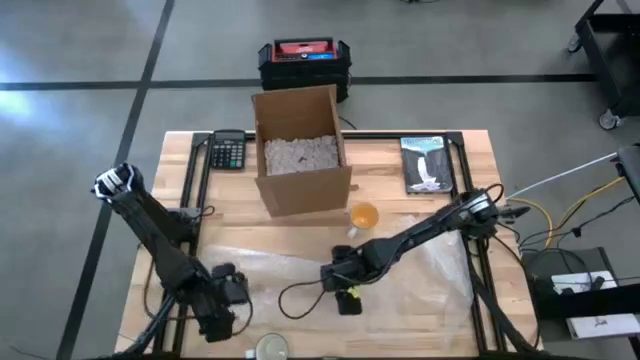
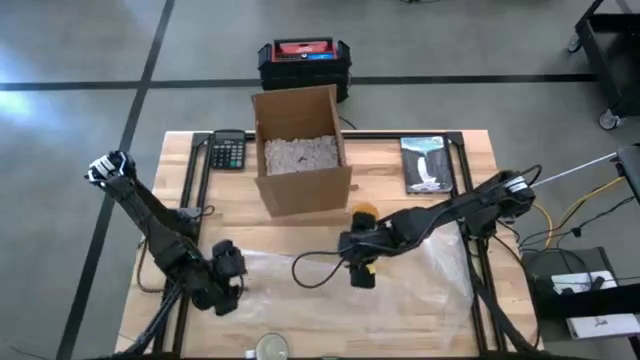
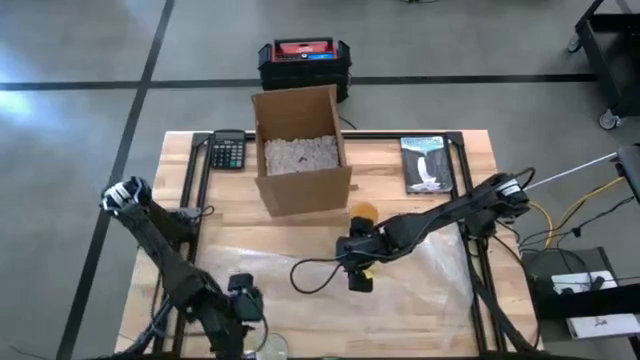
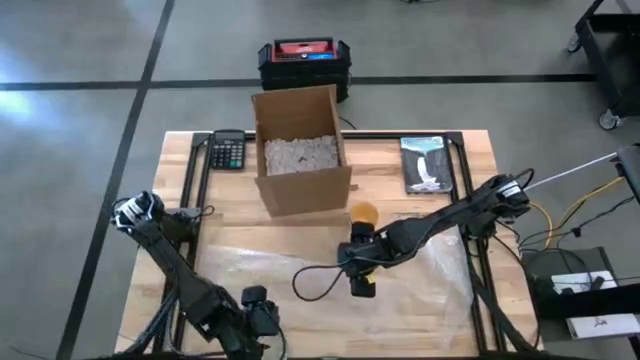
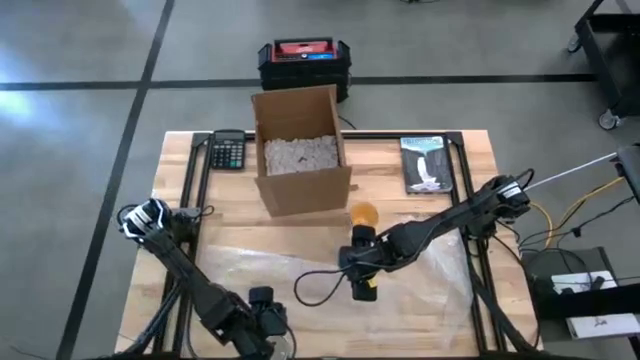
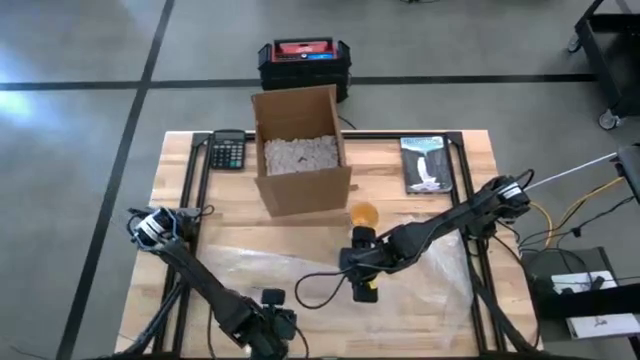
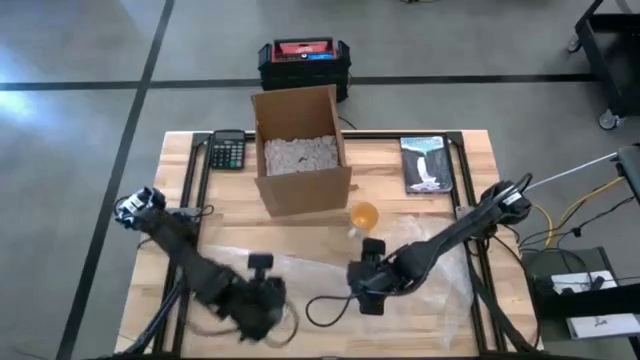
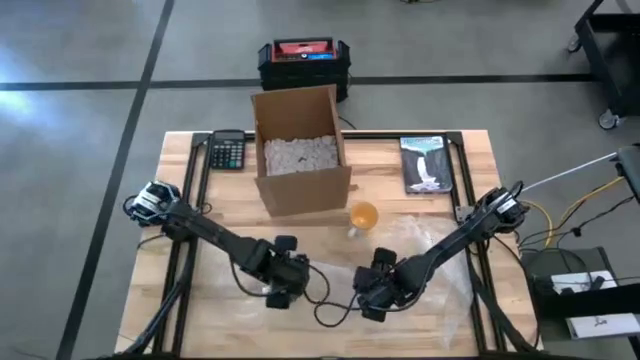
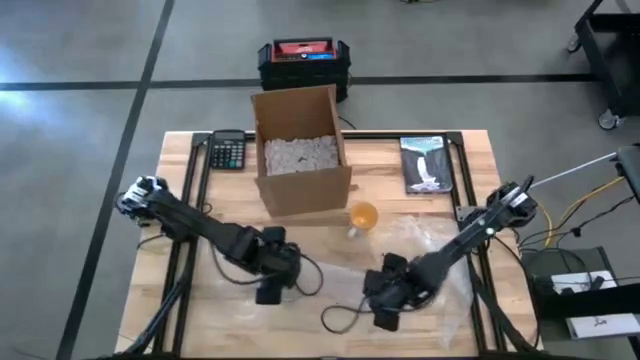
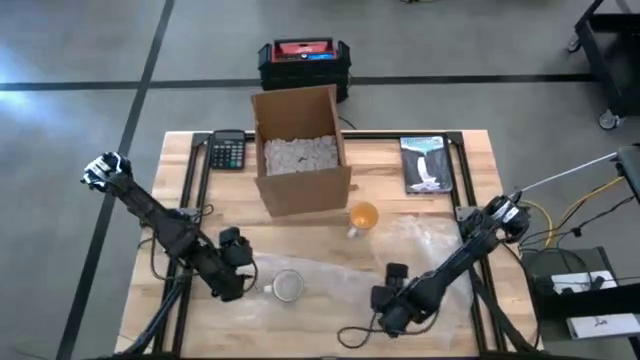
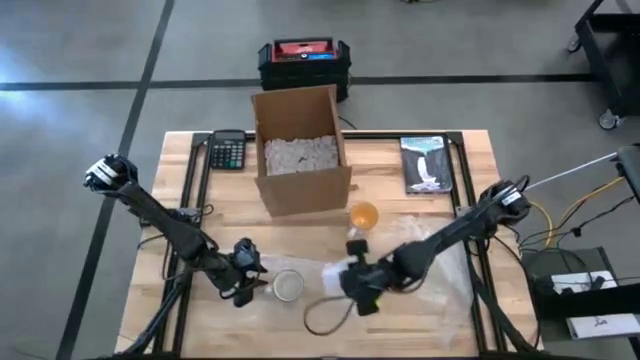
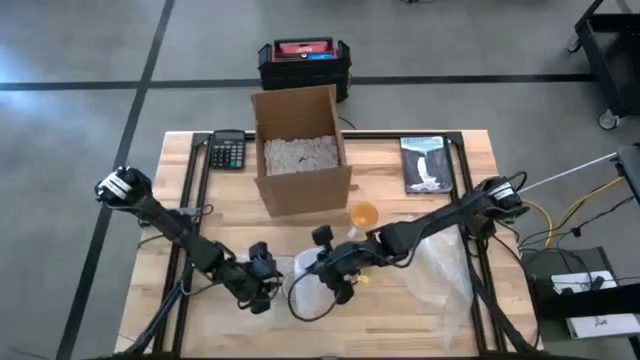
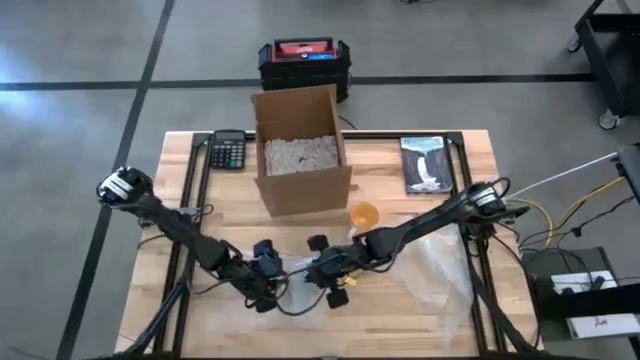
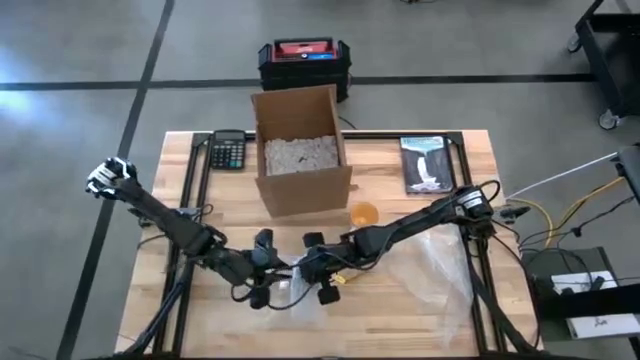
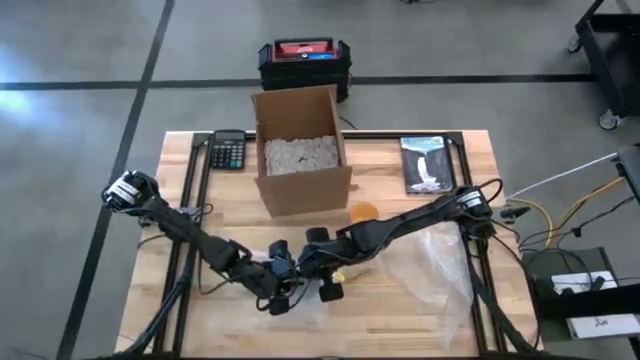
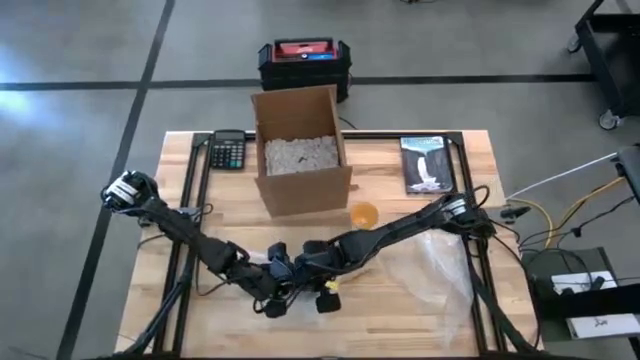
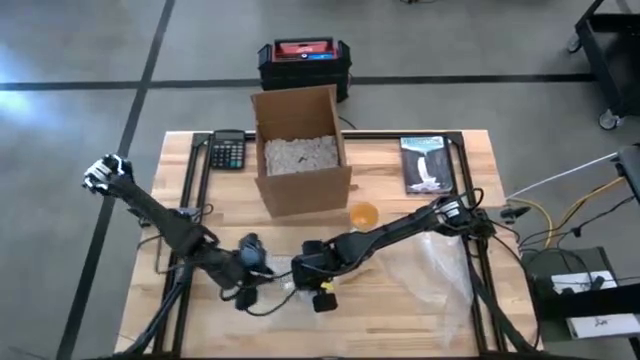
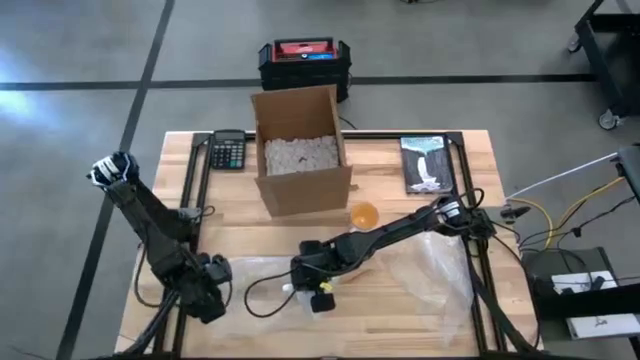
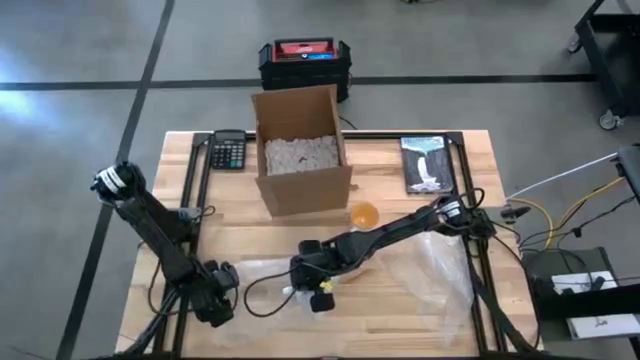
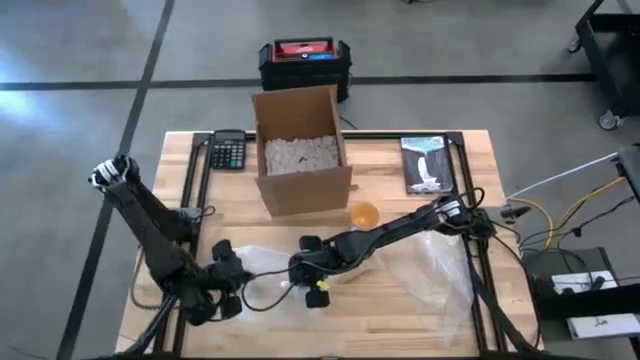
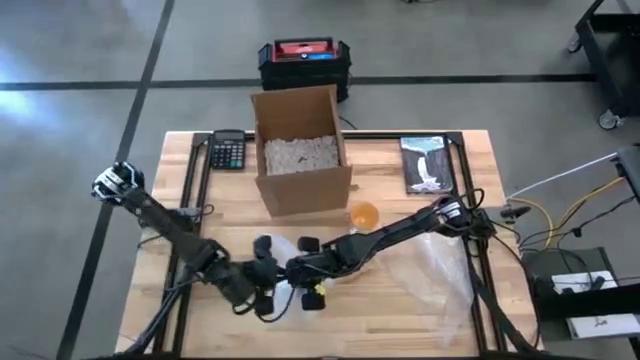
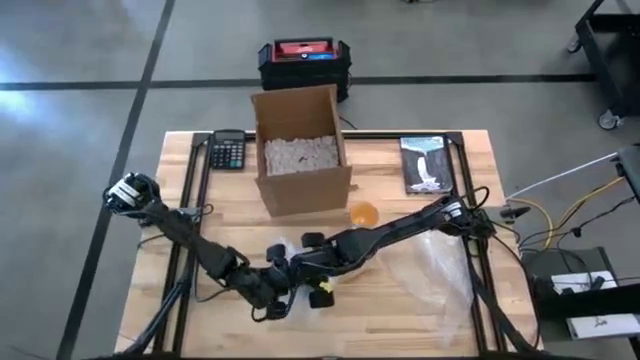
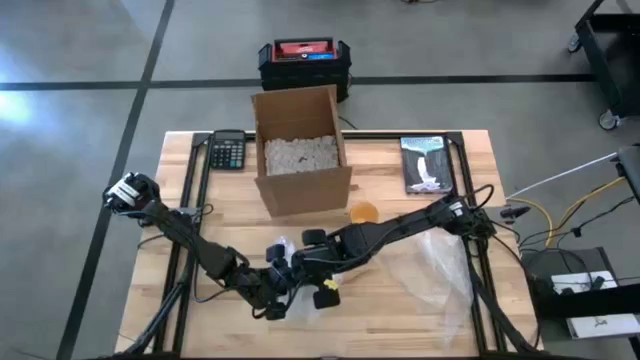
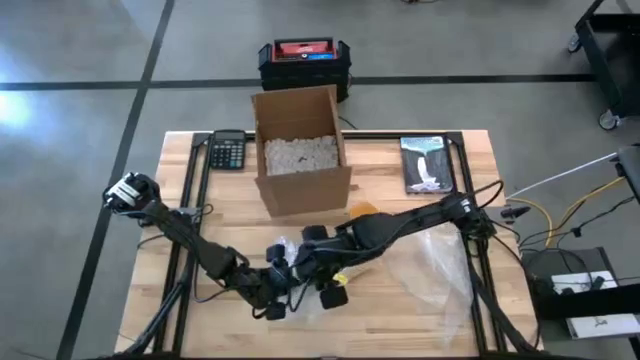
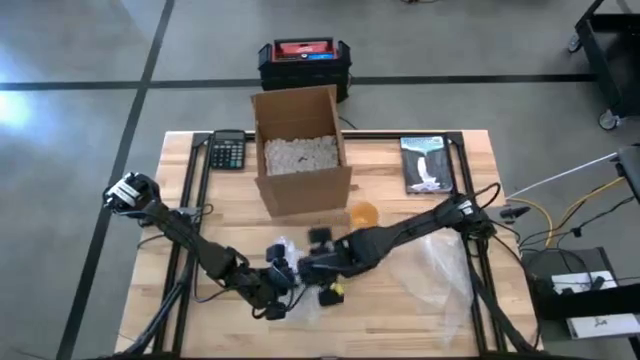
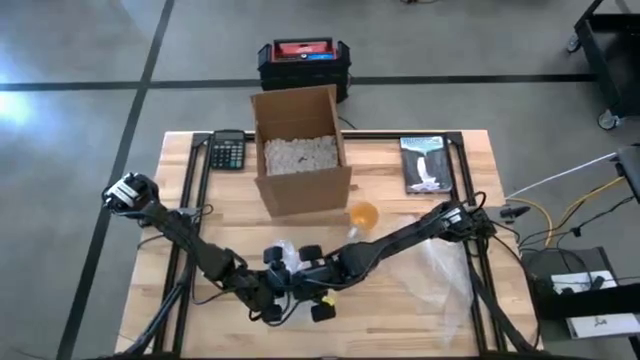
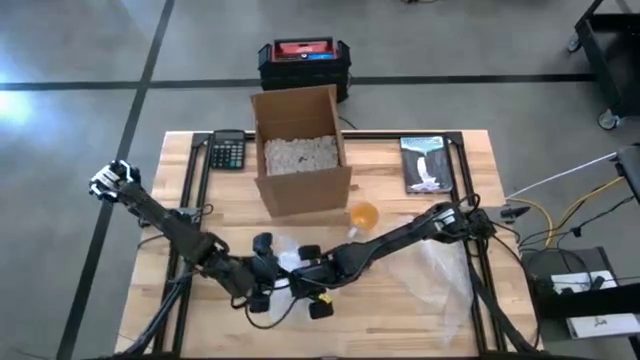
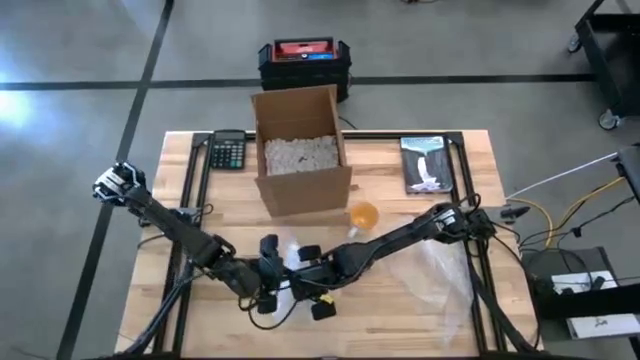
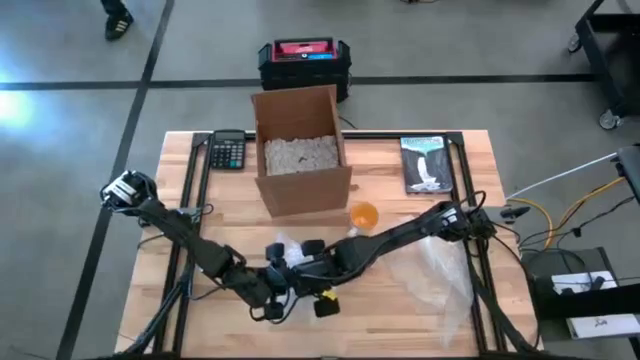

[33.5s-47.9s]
Task: wrap mug
Wrap the blue mug with the transparent bubble wrap

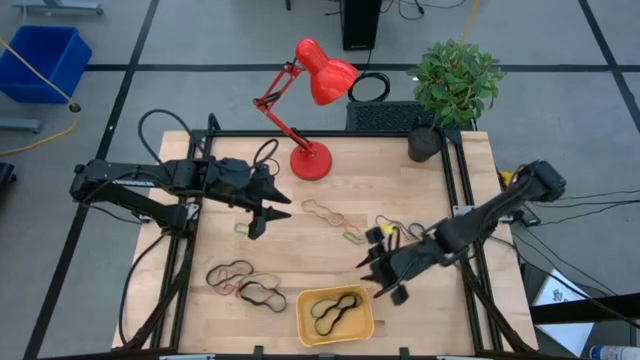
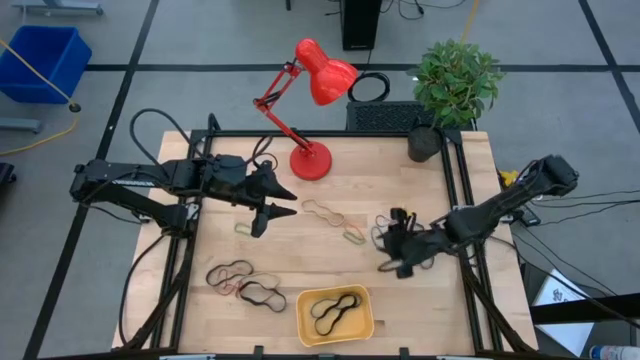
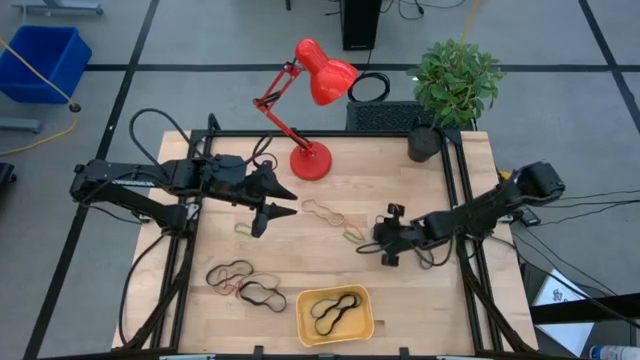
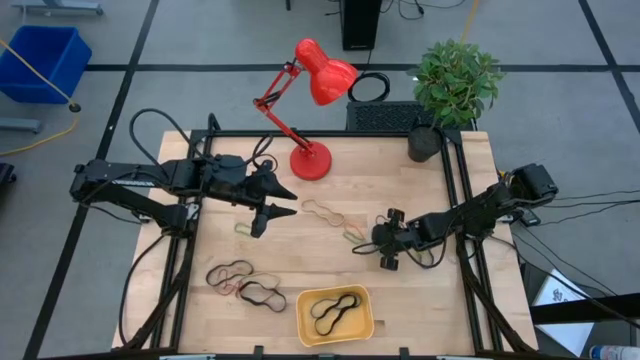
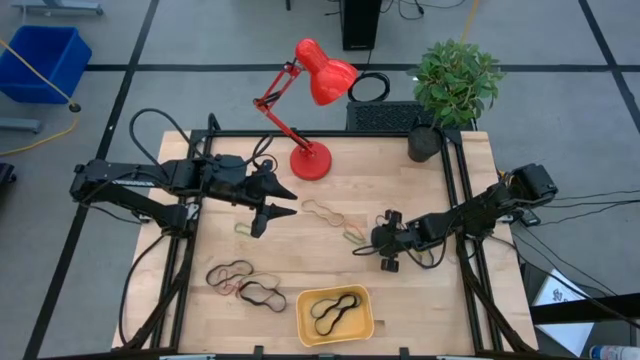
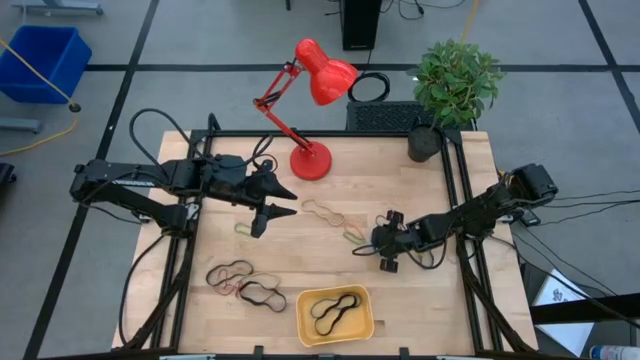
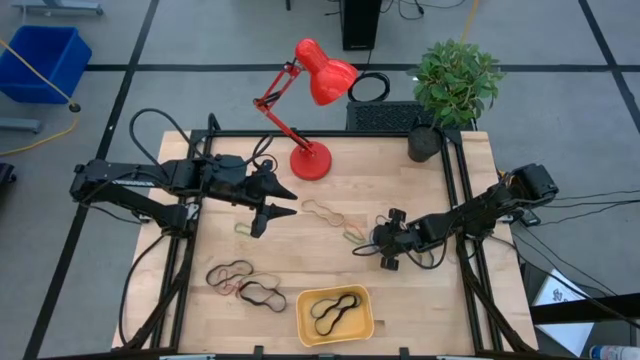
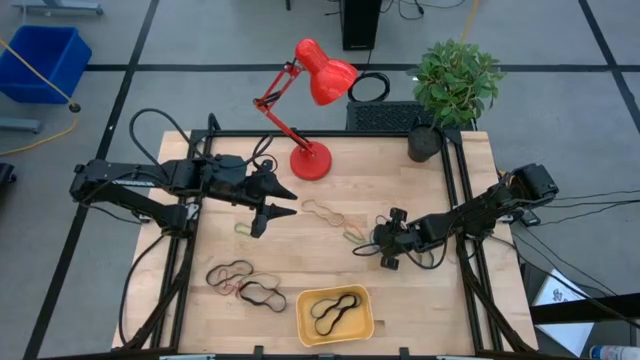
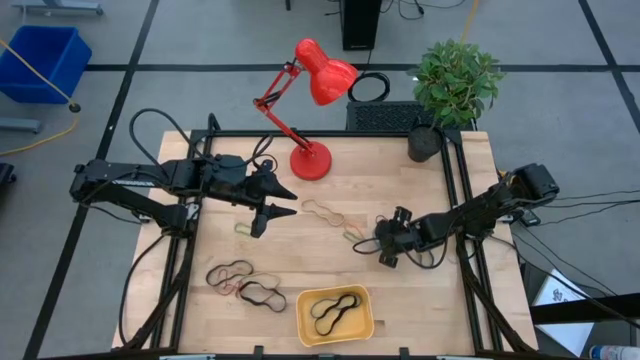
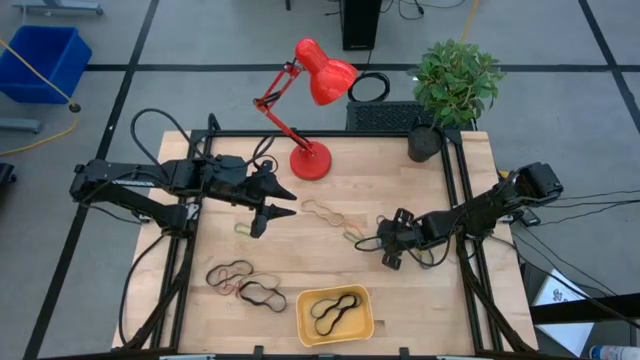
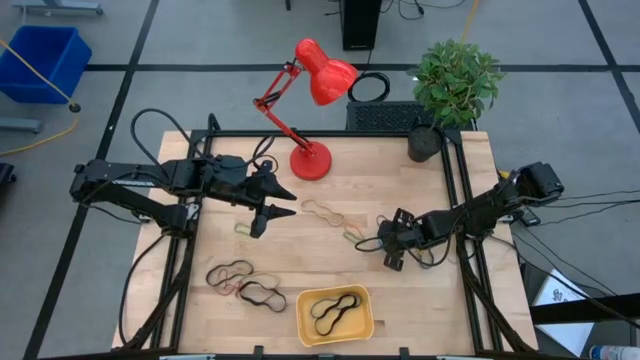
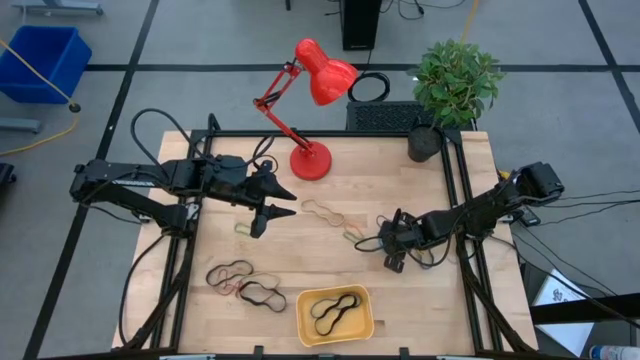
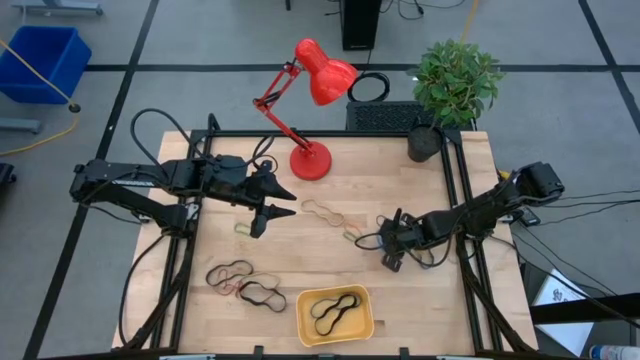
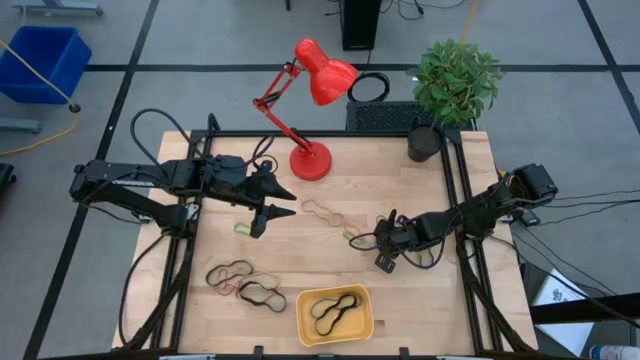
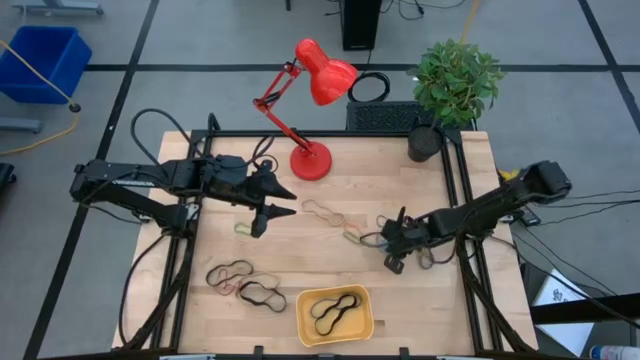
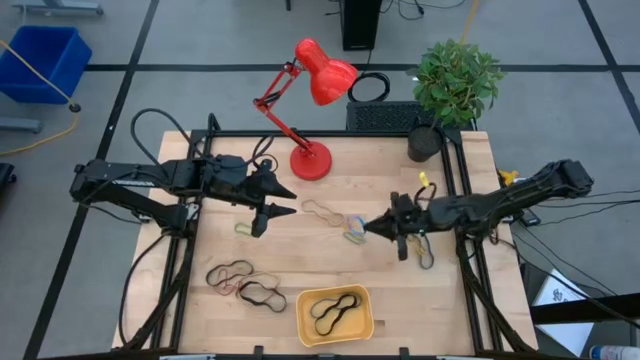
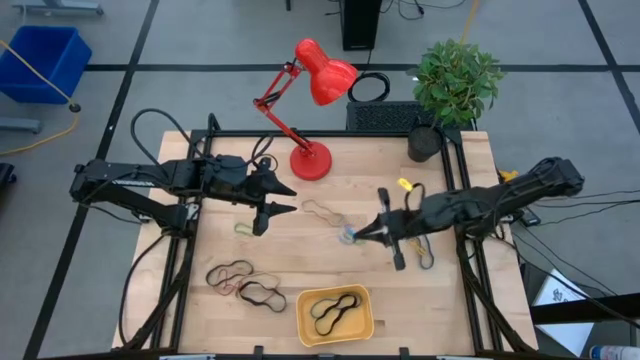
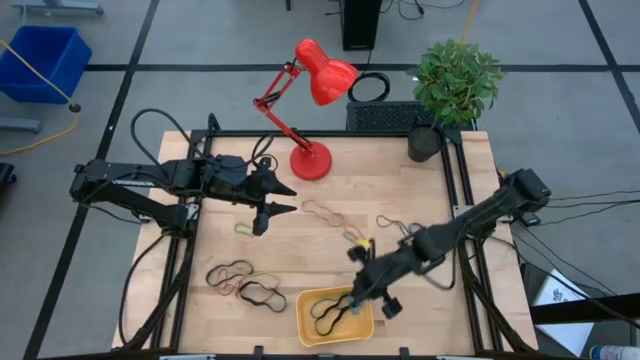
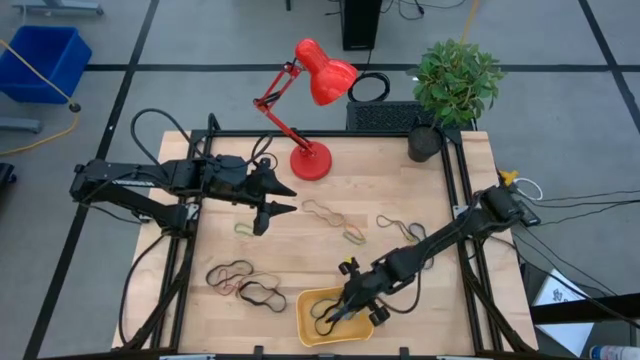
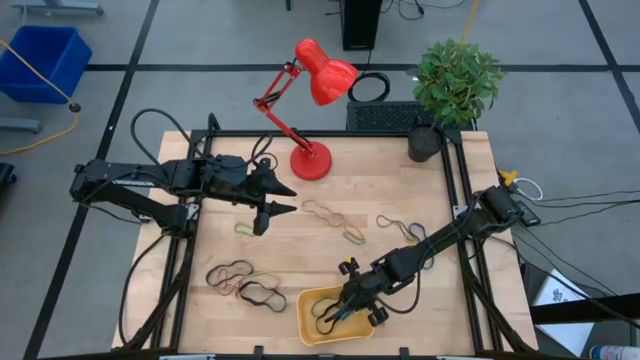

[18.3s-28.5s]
Task: Pick and place rubber bands into bin
Put the light blue rubber band into the yellow bin
